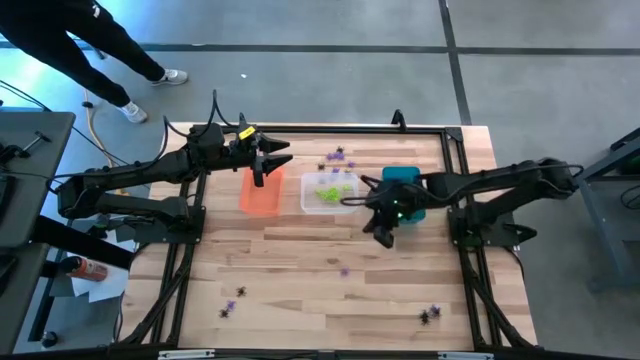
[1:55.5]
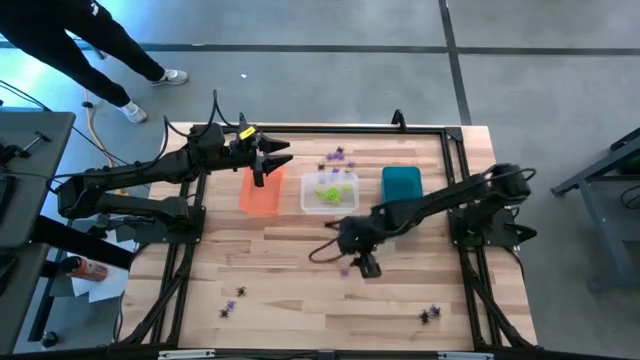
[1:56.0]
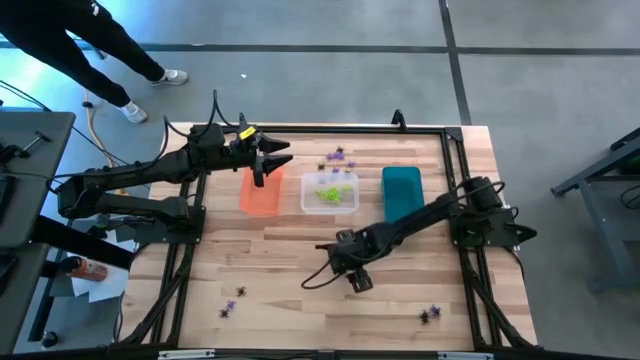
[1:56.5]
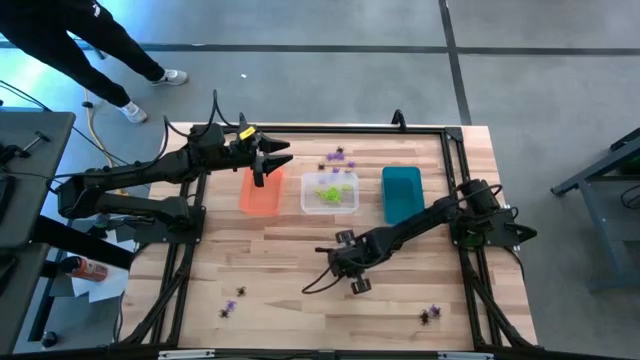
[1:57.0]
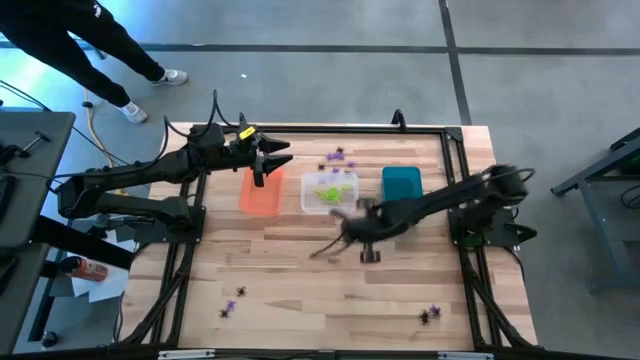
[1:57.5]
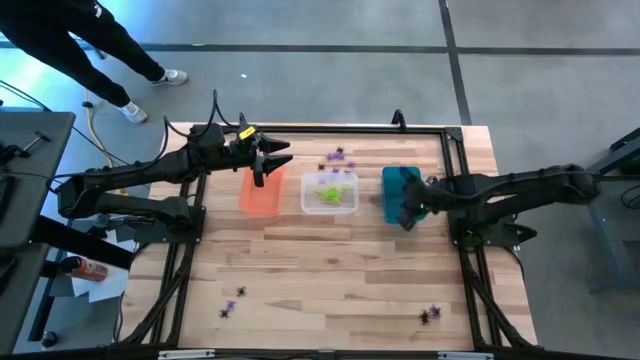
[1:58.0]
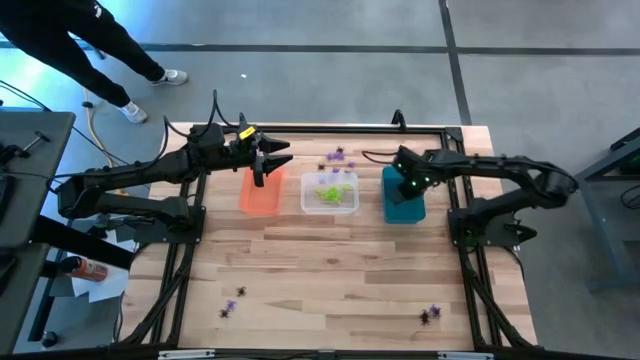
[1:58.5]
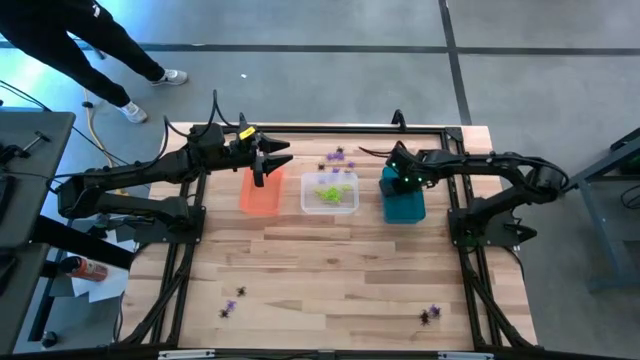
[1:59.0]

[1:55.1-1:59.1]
Task: Sort Halloween decoration
Put the purple spider toy into the blue bin

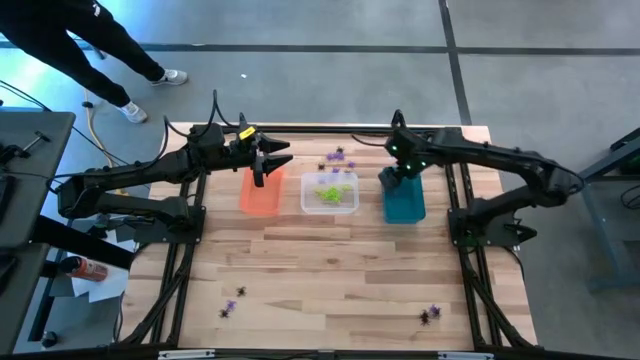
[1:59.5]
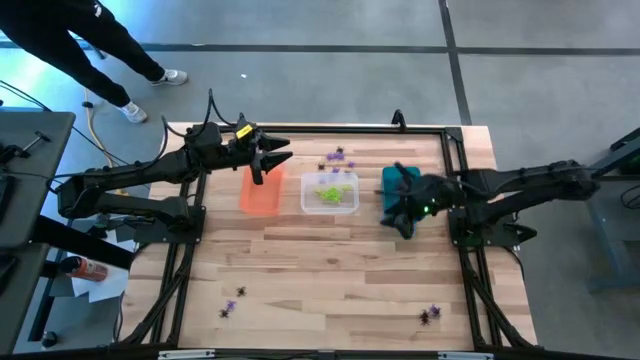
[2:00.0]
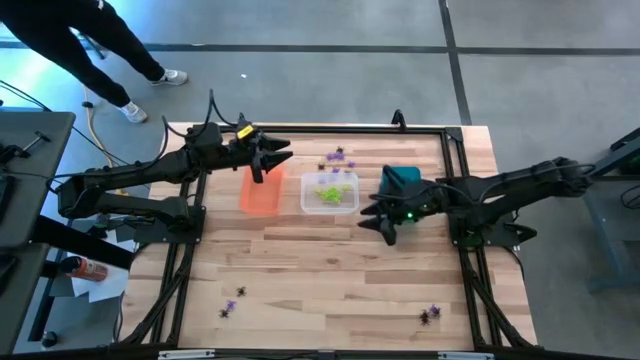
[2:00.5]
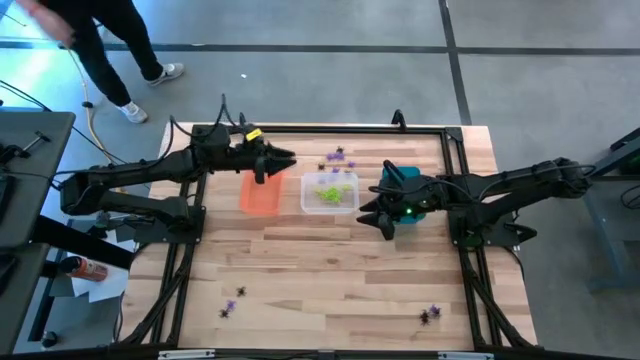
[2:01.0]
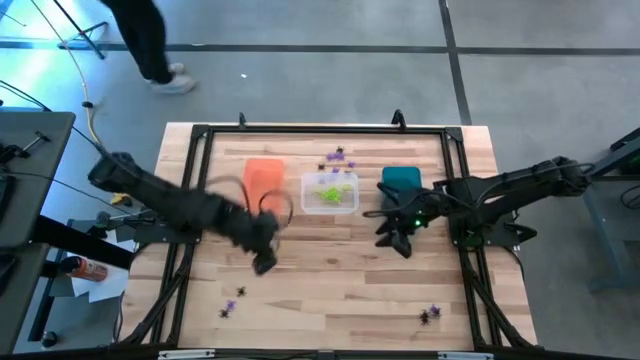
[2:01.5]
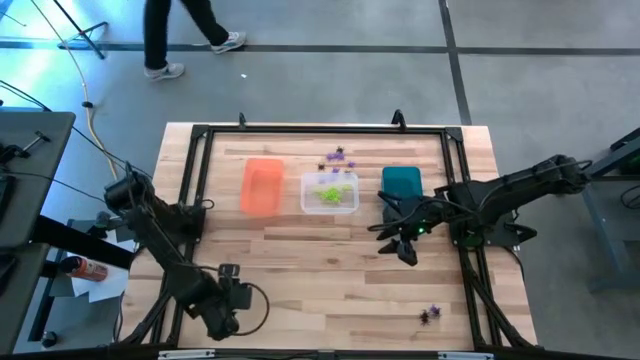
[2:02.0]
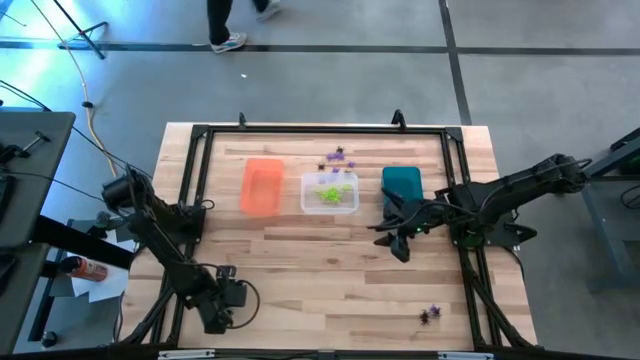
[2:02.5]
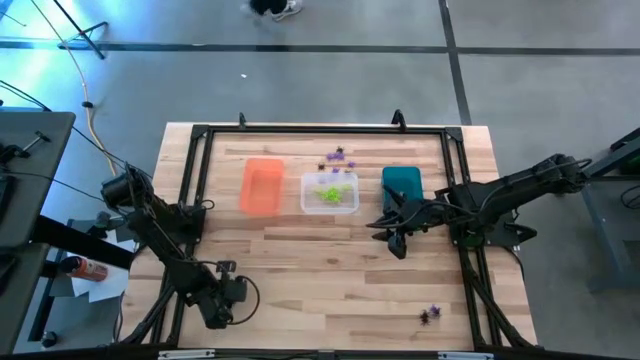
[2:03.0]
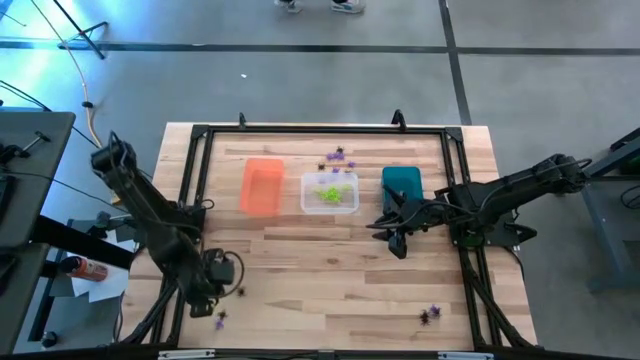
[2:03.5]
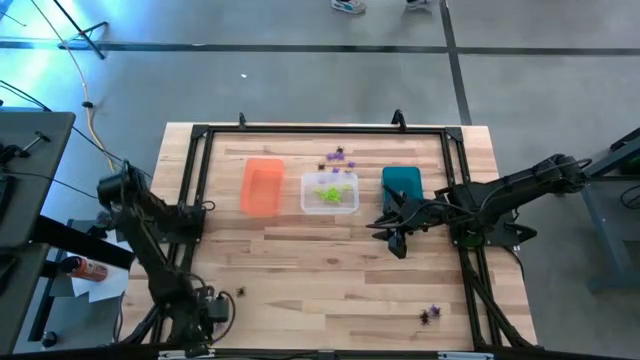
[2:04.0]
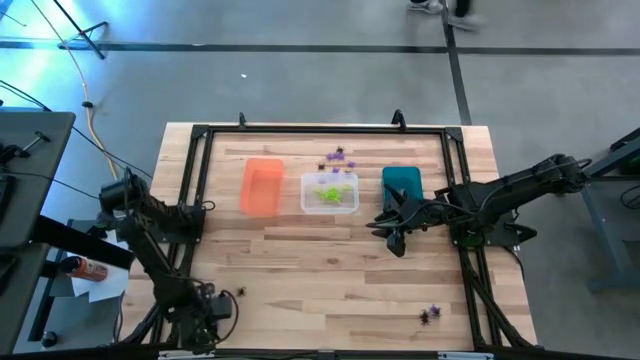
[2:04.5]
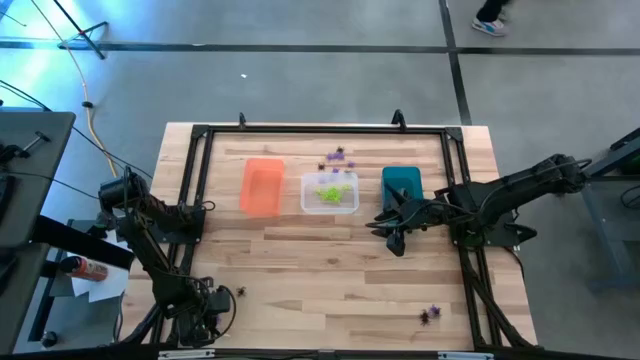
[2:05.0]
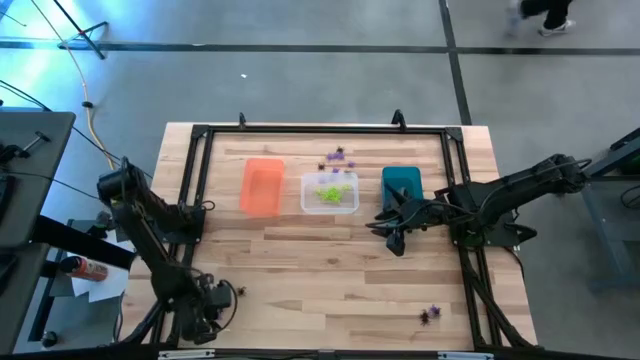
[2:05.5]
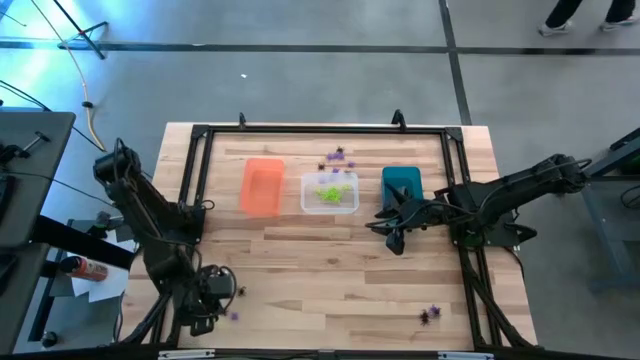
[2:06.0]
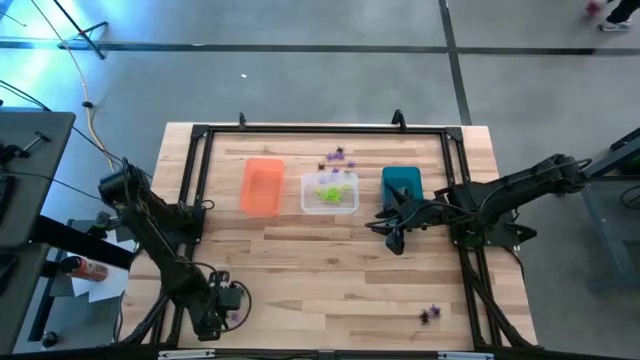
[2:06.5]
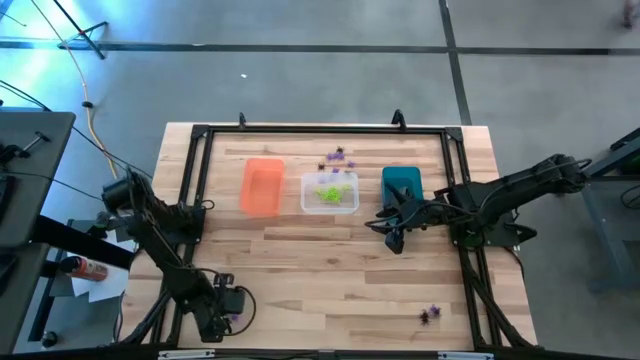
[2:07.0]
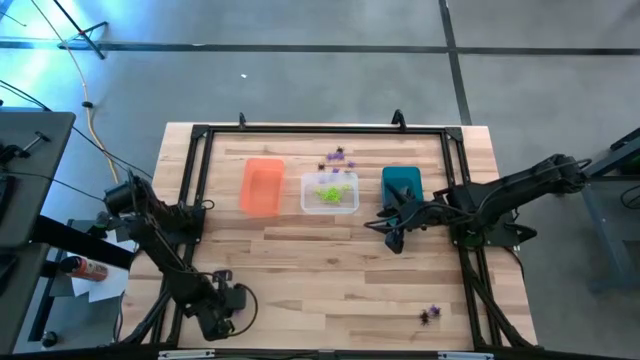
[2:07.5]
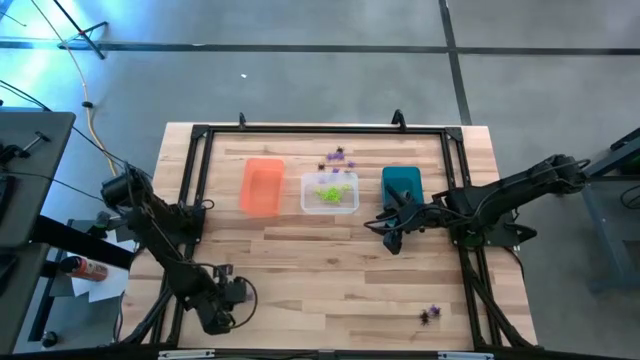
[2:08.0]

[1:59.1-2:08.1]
Put the purple spider toy into the blue bin

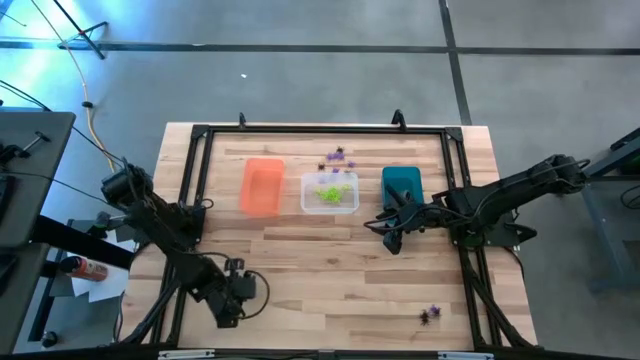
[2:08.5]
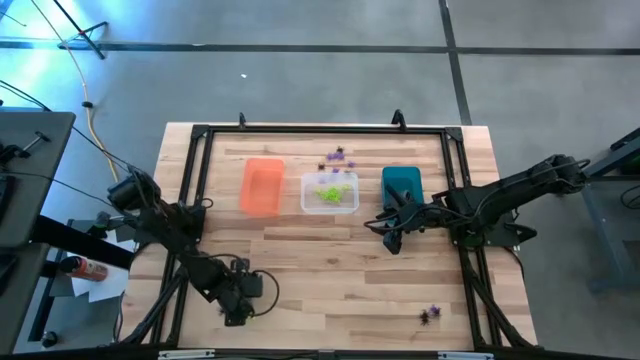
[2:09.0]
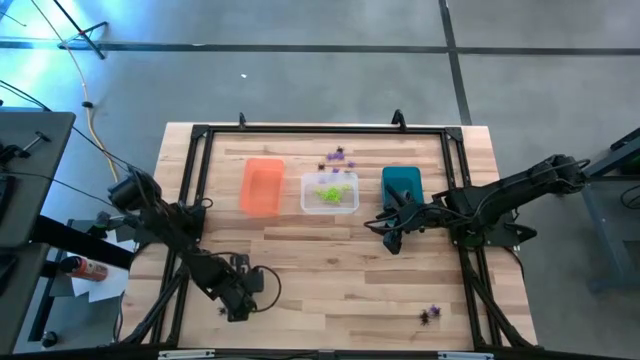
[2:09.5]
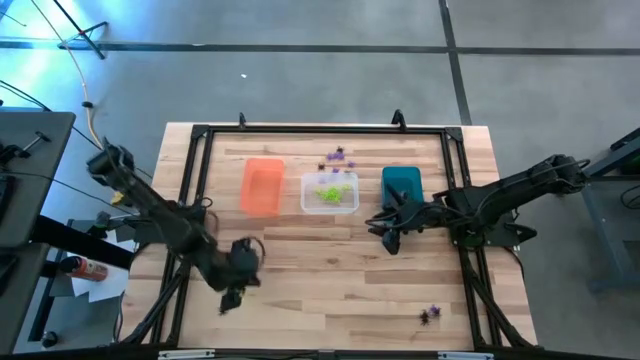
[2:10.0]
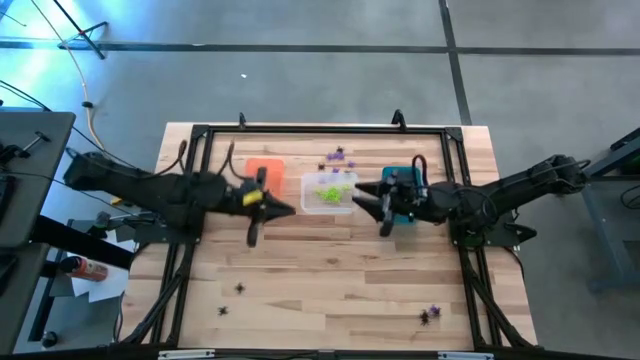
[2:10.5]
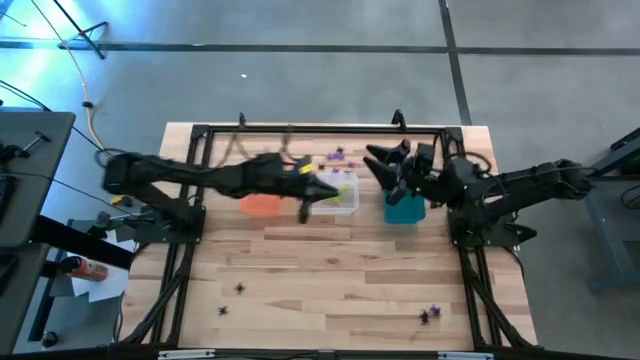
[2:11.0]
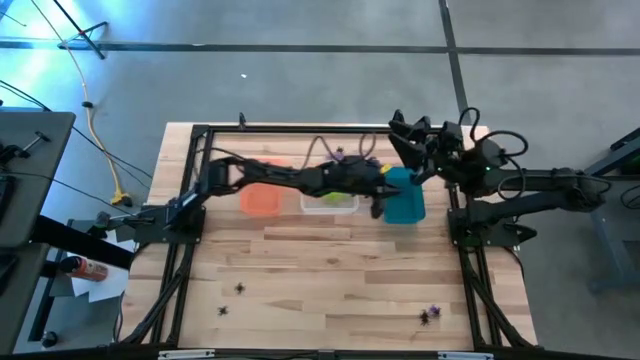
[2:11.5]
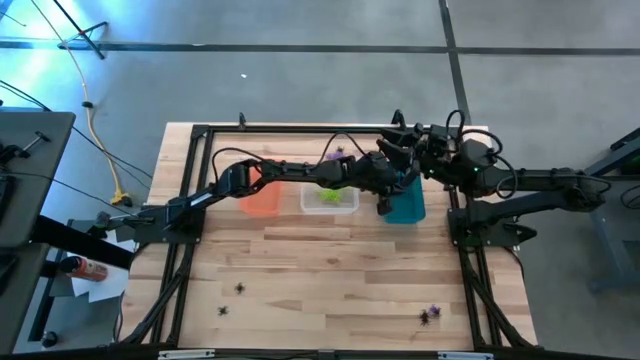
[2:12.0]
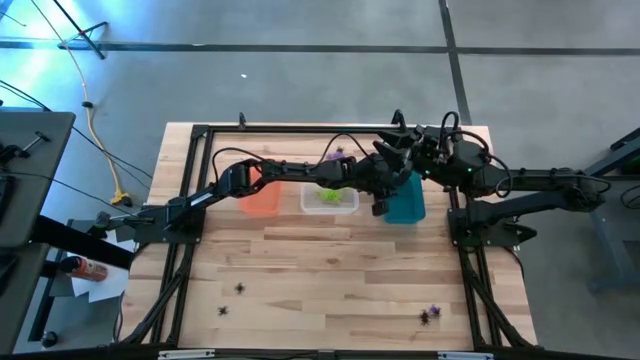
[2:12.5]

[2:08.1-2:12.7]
Put the purple spider toy into the blue bin

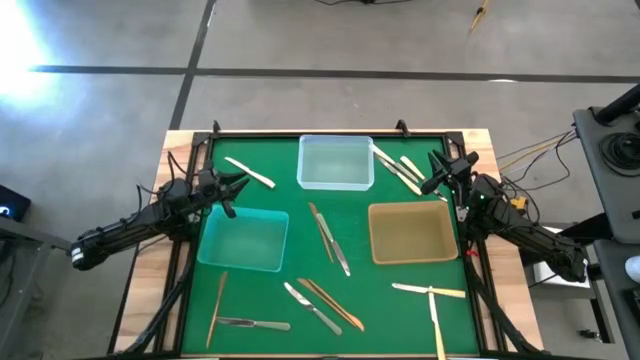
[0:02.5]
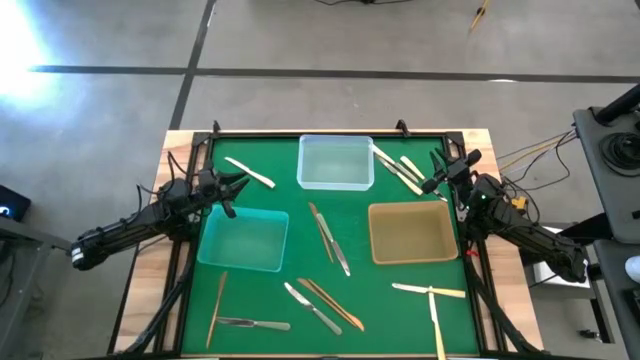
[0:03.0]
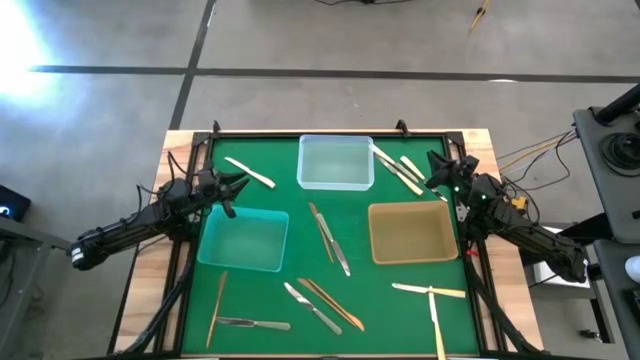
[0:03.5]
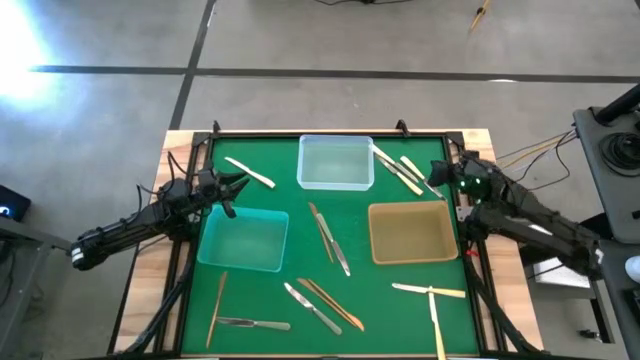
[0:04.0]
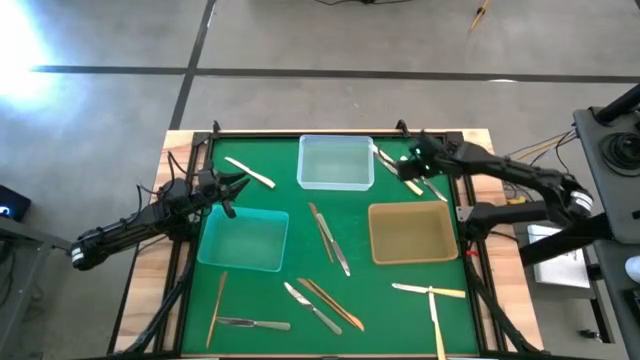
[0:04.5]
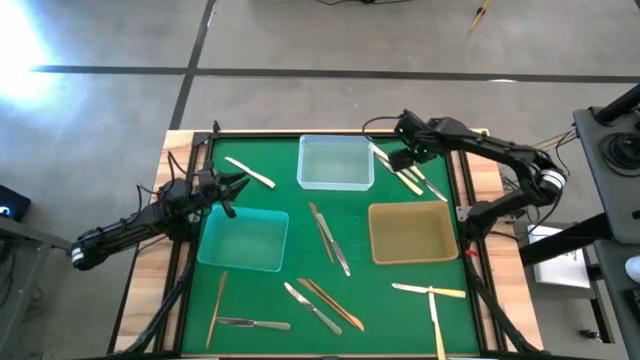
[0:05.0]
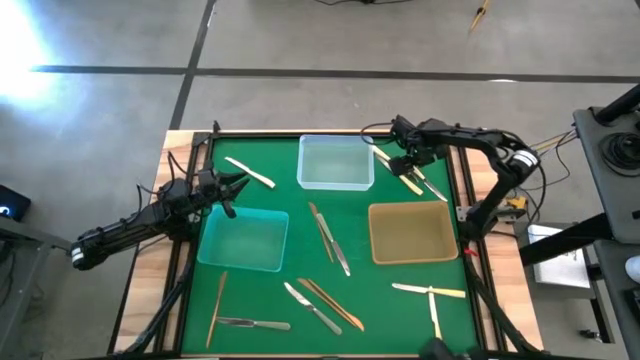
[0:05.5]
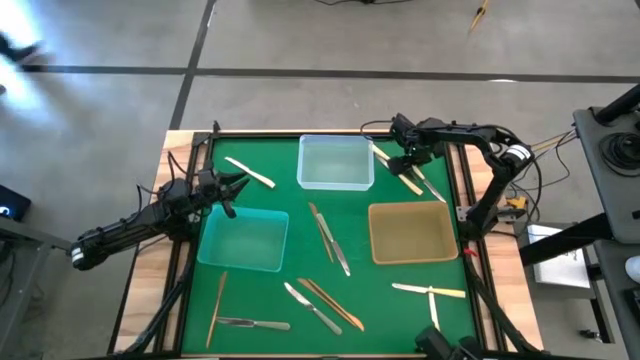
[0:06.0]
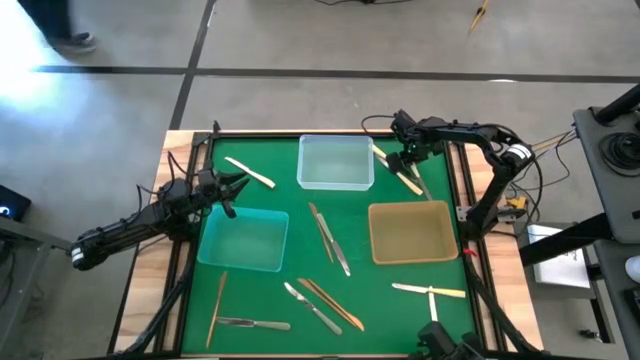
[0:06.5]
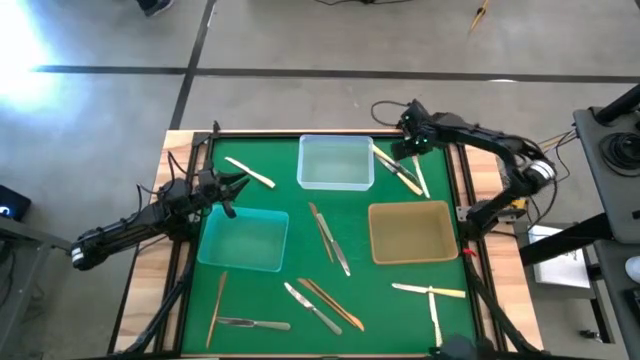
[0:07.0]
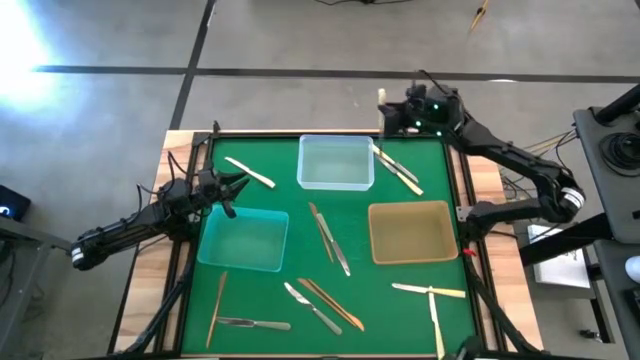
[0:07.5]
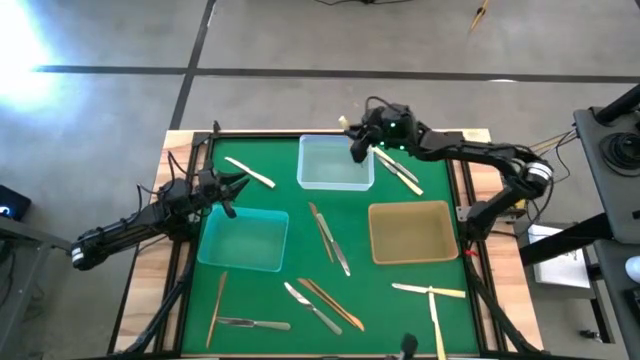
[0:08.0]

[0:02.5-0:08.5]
Task: Sort silverware by color (type)
Put the yellow knife into the transparent bin
